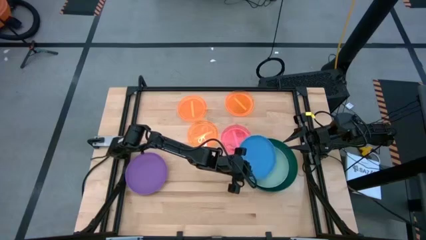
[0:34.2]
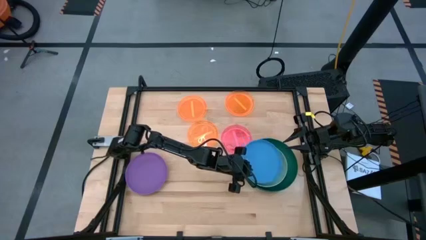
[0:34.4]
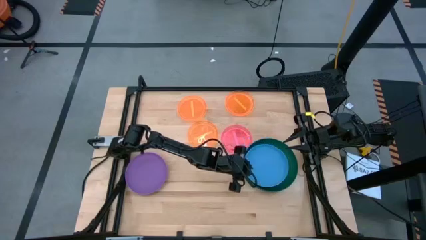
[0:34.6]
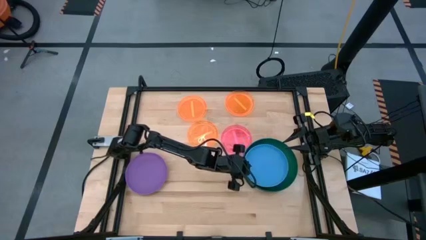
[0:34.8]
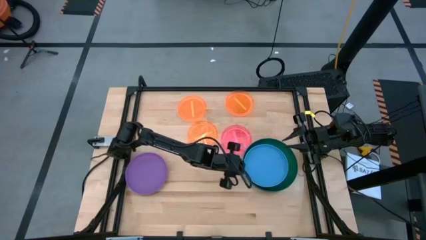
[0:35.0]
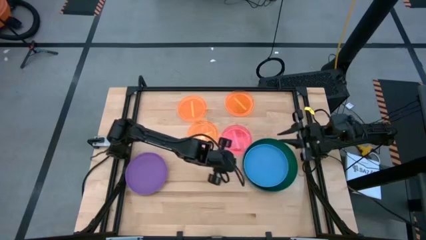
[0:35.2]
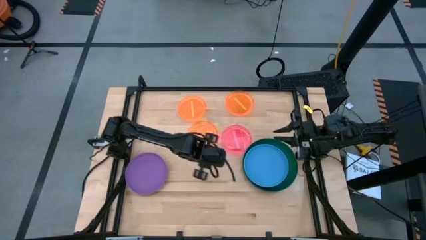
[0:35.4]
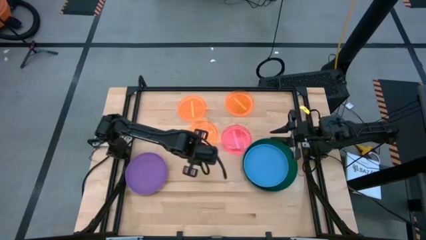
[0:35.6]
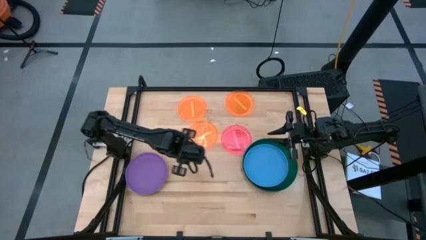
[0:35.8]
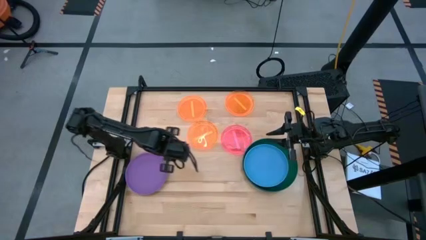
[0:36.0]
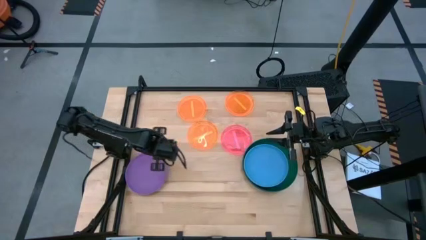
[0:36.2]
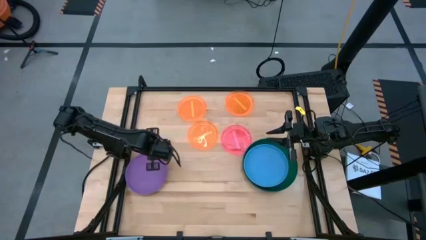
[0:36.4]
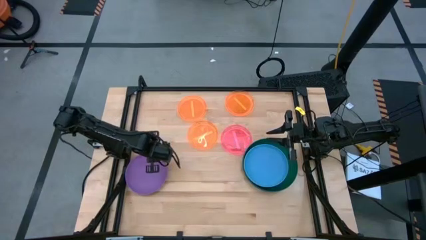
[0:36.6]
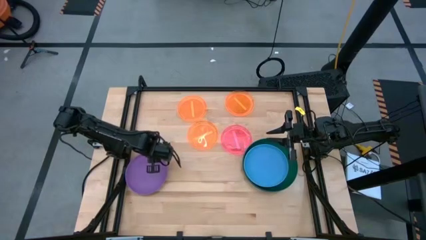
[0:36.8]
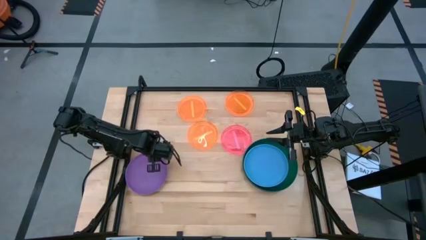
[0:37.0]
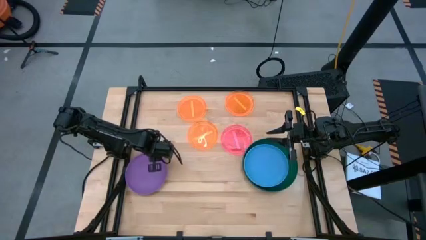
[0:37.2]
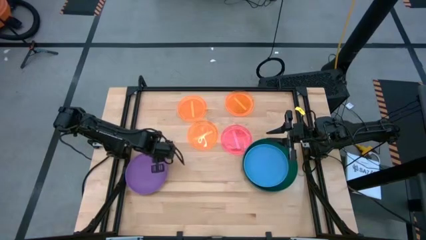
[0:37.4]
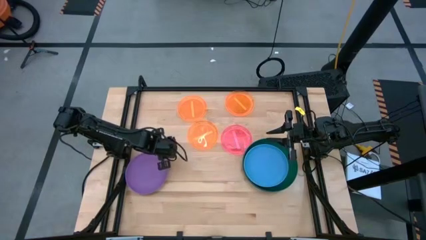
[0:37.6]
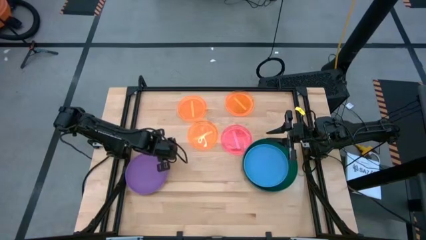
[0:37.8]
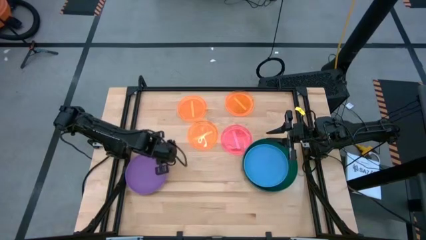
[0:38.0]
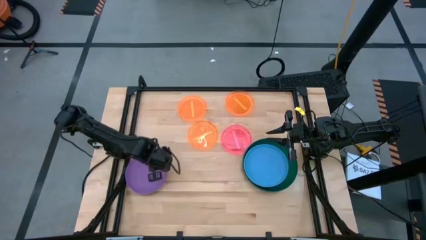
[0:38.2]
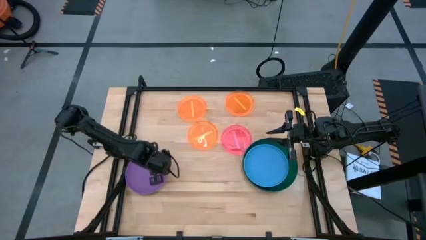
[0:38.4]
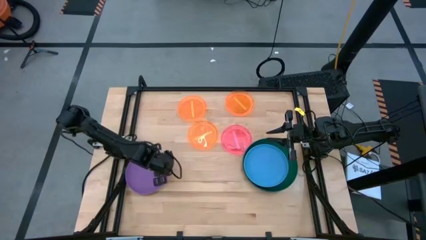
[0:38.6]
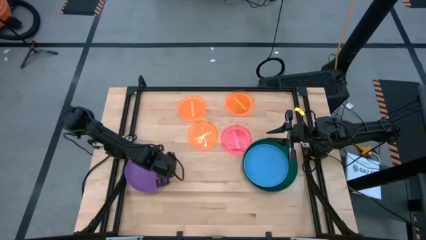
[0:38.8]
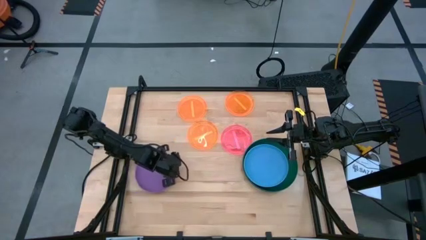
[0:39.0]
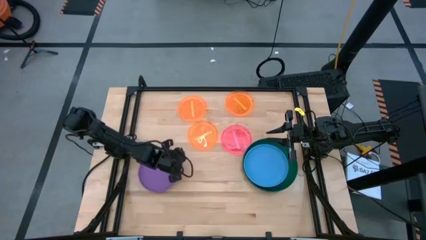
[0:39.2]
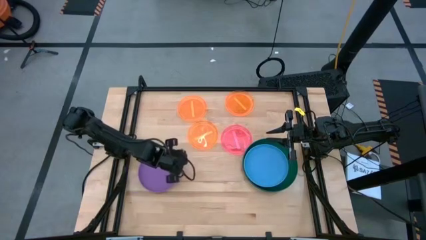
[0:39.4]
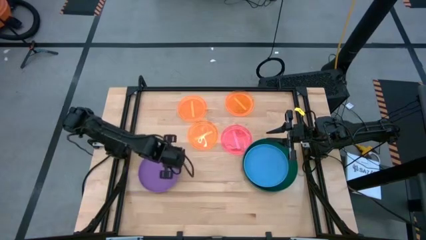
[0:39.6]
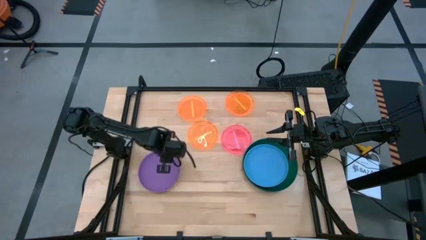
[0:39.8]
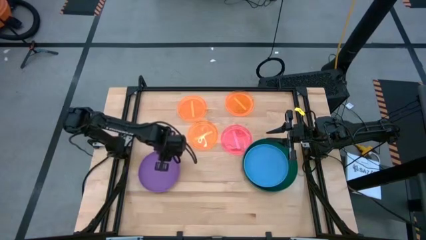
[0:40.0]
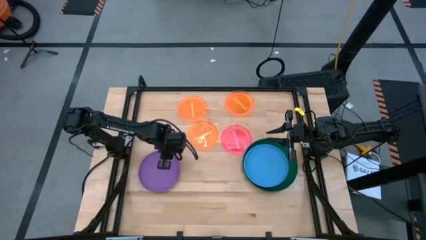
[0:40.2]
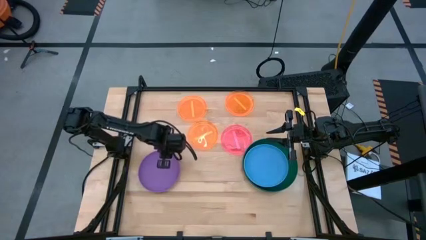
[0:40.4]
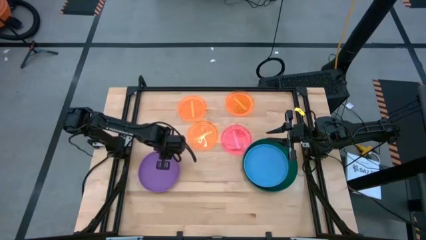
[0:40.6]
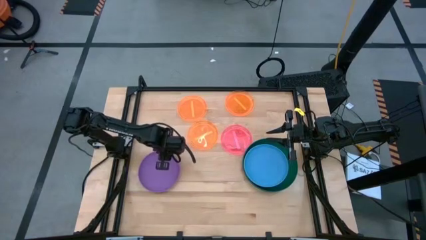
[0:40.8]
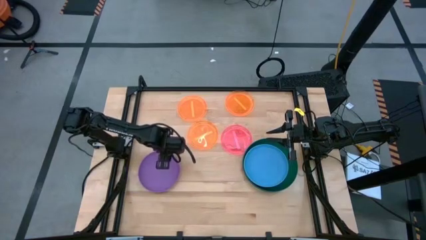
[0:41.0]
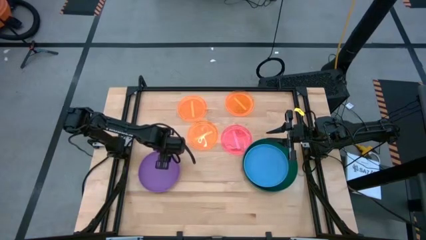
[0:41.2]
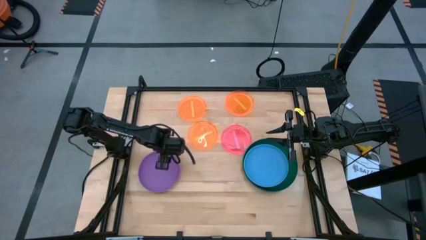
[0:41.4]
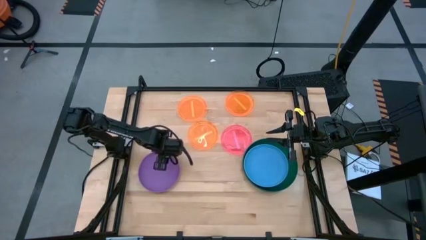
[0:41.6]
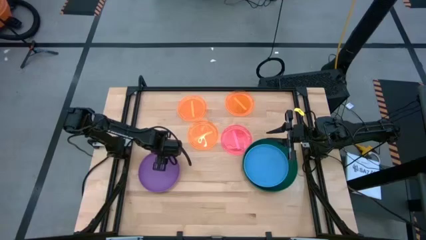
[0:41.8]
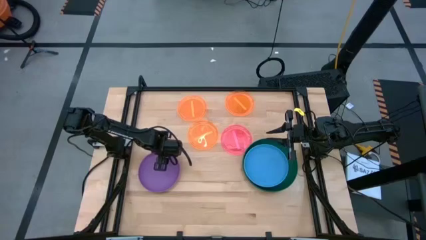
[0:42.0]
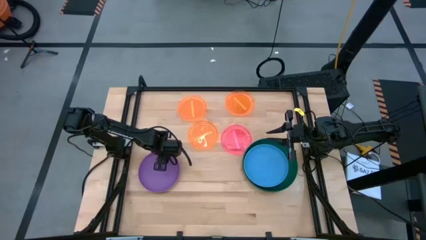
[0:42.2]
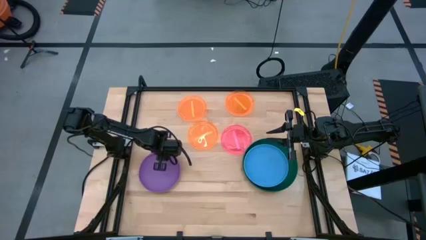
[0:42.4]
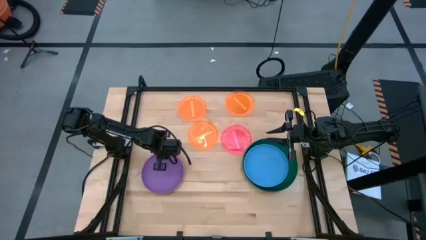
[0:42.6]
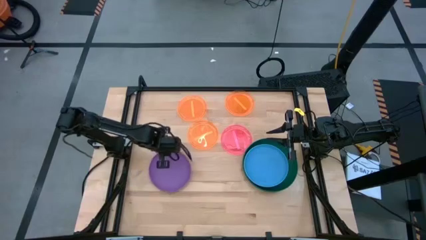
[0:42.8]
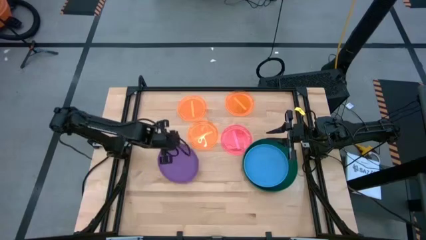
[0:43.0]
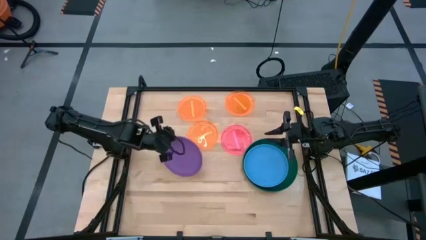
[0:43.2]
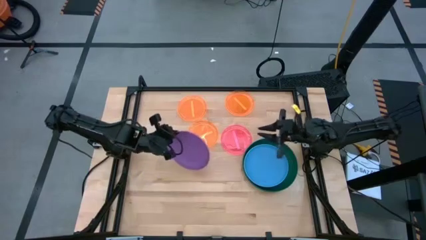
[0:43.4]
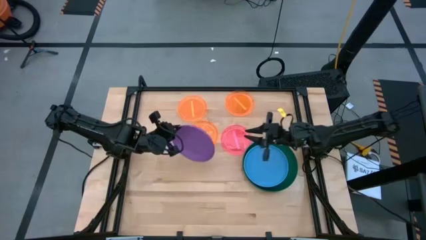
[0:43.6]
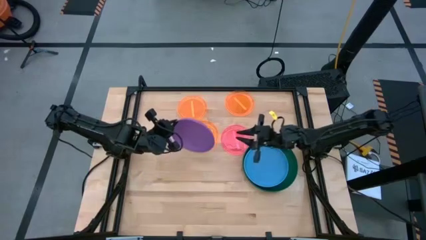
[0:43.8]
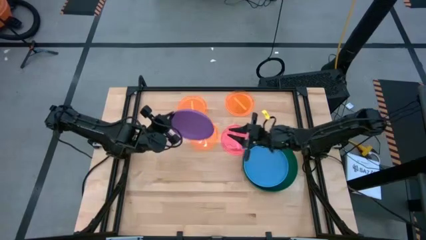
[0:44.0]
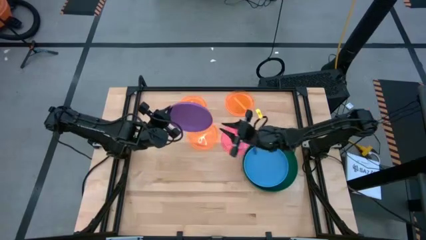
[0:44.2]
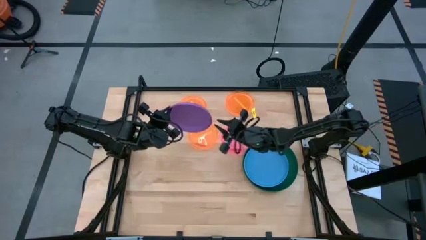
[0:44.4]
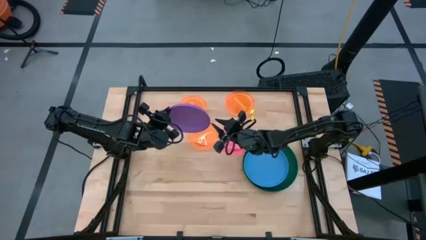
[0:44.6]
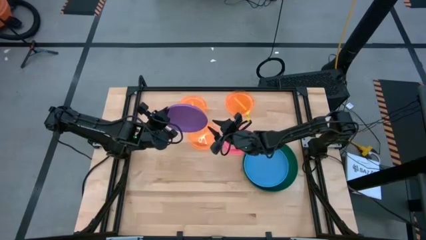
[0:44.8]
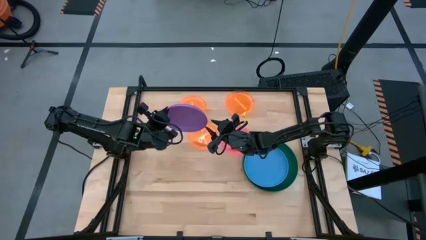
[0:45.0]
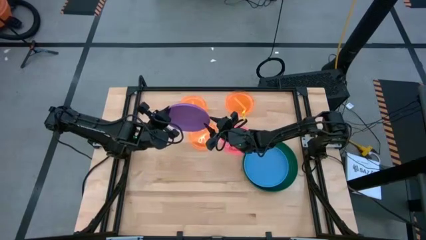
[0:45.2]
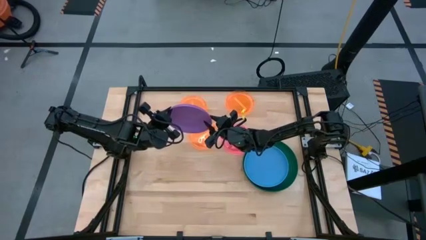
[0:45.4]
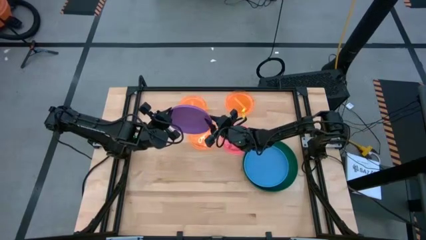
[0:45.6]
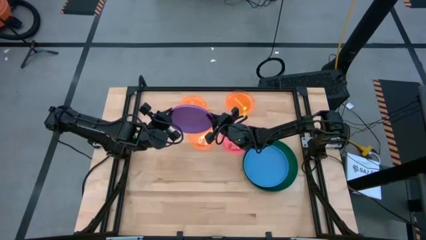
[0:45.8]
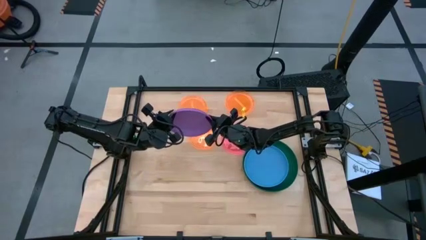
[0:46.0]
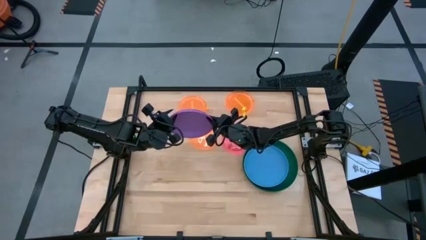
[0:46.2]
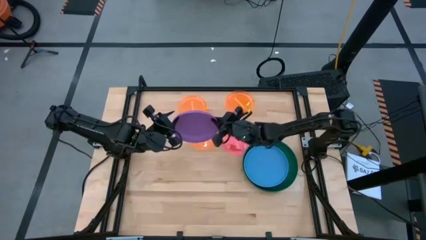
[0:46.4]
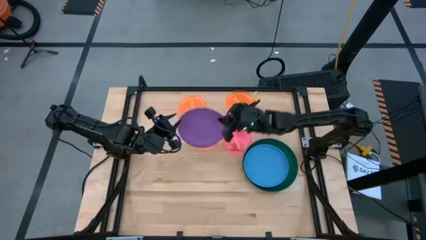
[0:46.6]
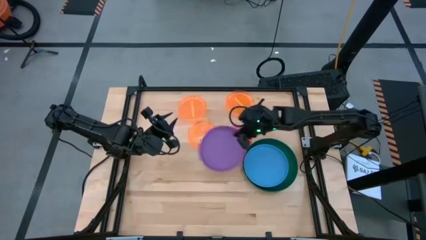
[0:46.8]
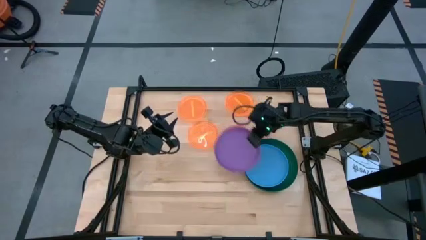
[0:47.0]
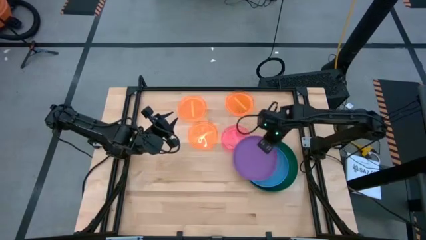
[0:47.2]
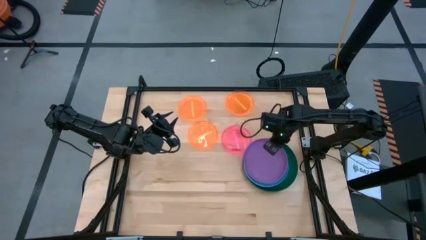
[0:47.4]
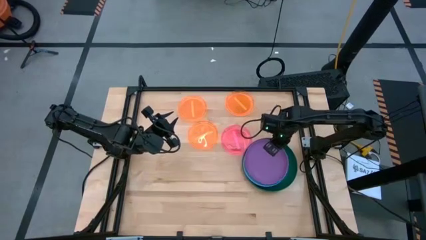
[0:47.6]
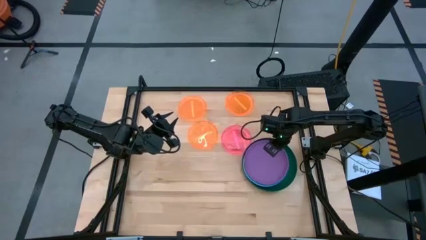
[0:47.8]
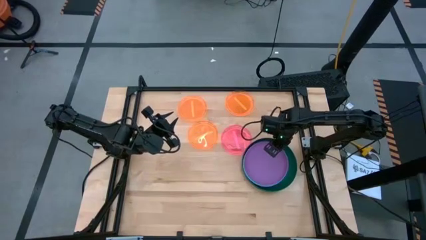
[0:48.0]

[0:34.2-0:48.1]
Task: Stack plastic plates
Stack the medium purple plate on top of the medium blue plate
